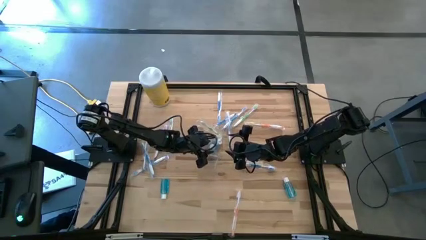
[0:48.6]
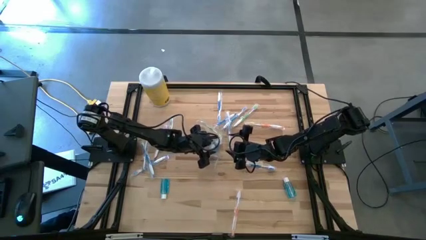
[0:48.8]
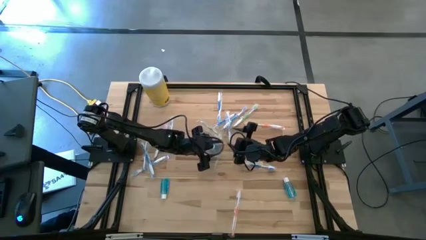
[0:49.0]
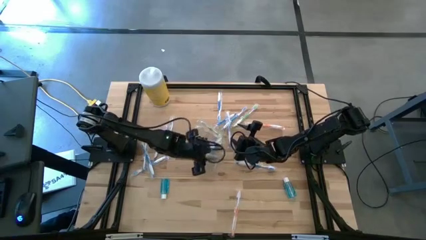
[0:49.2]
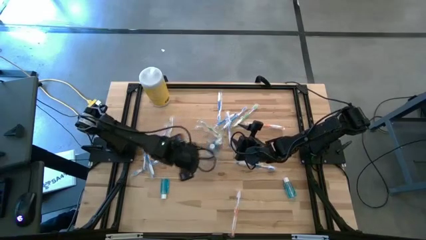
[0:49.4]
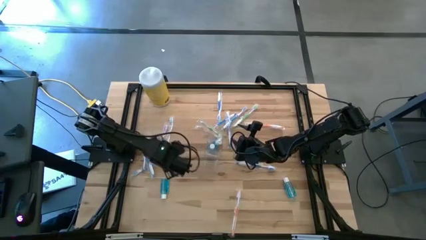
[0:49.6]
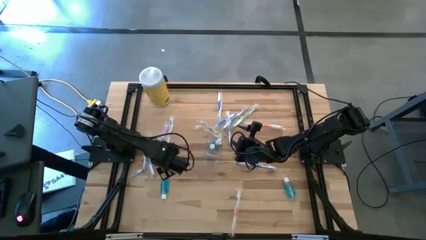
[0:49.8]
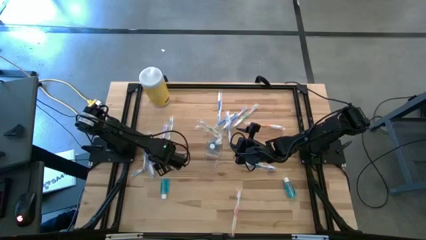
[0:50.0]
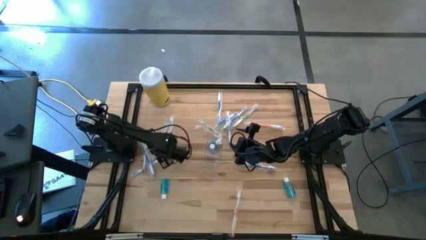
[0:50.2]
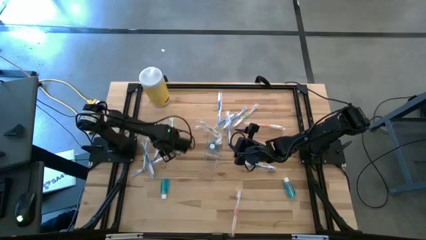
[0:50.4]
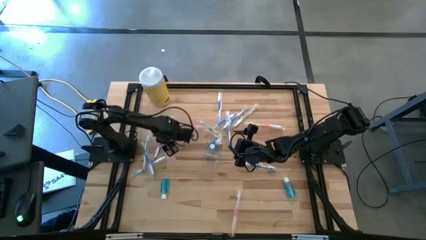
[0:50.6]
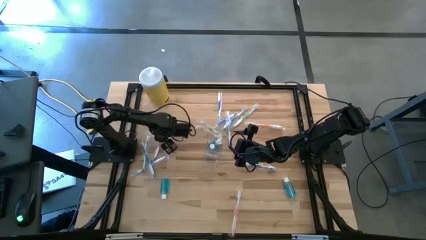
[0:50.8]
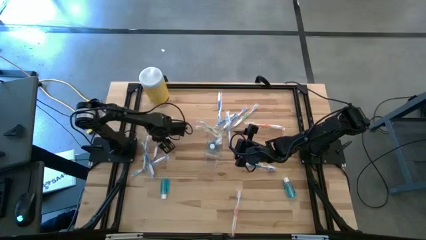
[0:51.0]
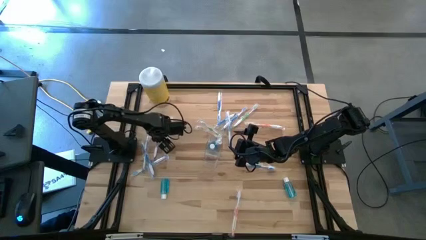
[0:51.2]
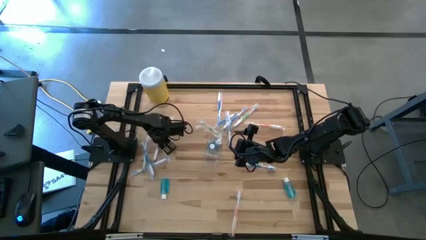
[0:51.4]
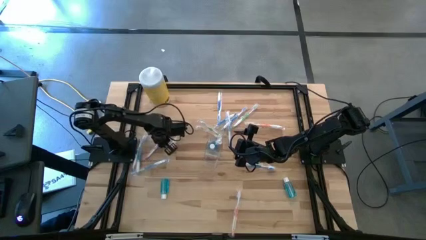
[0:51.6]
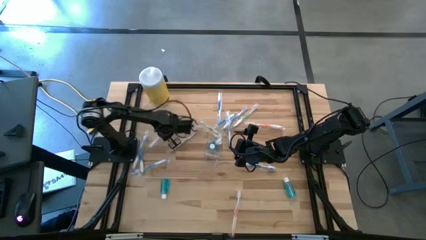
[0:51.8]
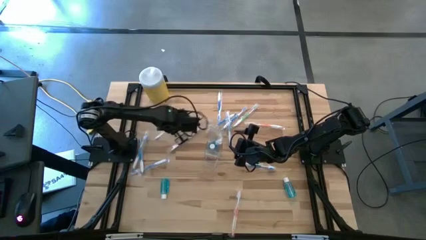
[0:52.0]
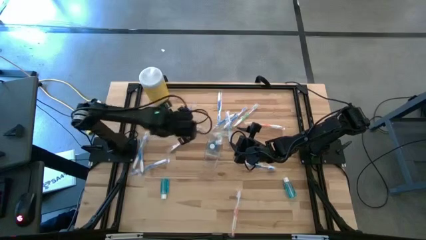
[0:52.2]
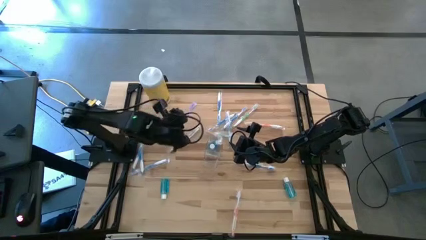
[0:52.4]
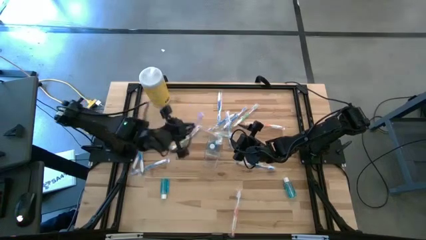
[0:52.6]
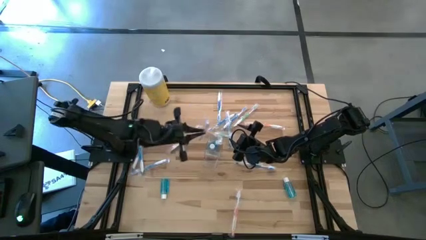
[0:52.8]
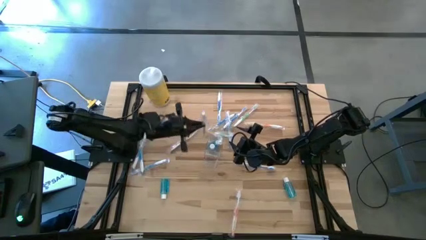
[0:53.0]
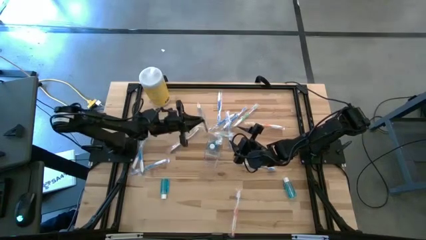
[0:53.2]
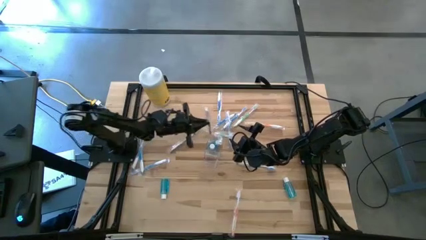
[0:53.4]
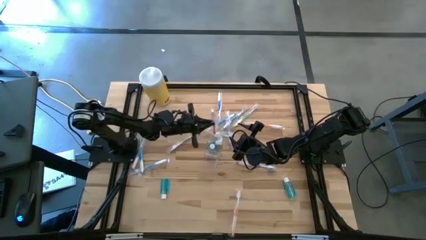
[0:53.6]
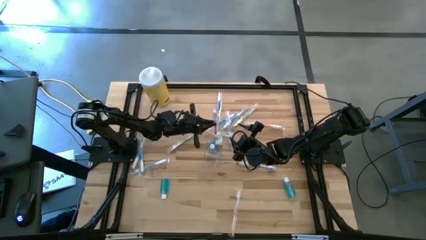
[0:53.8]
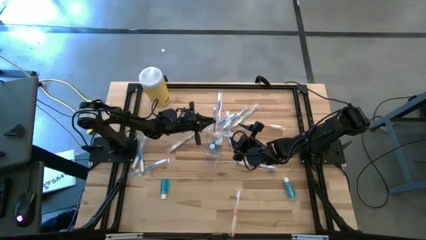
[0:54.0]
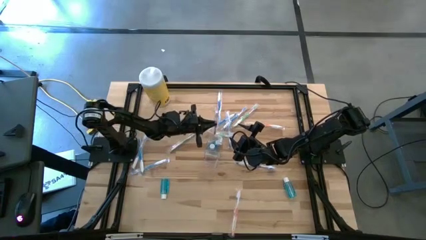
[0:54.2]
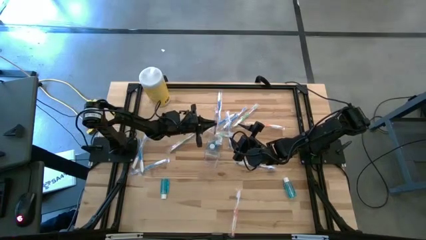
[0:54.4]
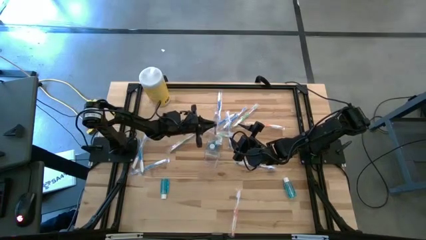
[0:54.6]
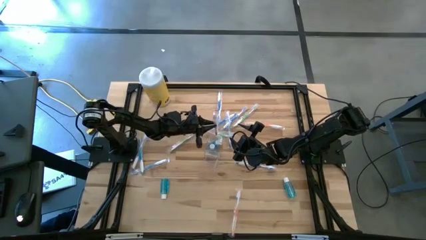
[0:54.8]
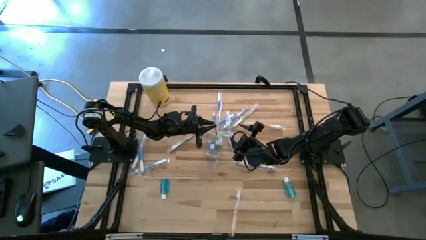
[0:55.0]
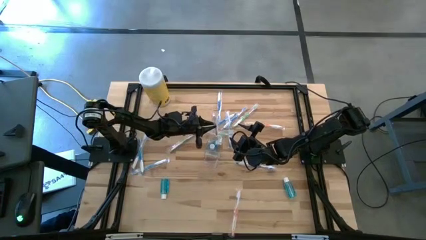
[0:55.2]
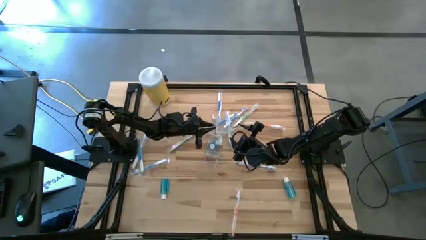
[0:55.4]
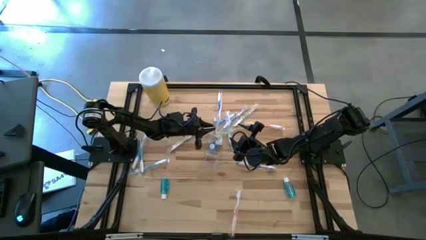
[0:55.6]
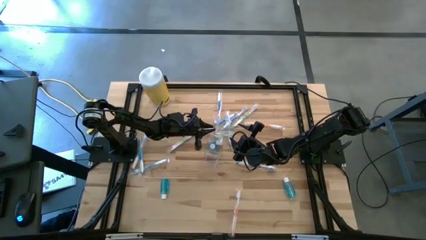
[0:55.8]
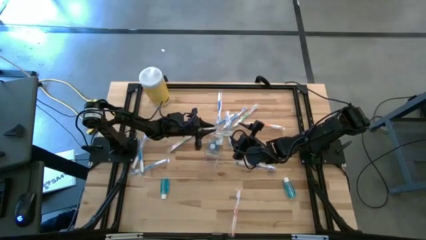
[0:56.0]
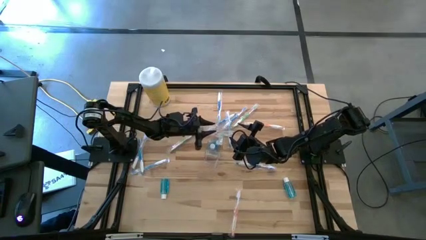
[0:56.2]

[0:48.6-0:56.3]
Task: Pick & Place toothbrushing station
Put the purple toothbrush into the transparent organizer

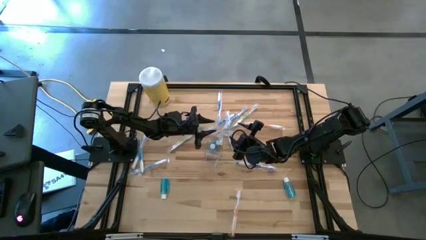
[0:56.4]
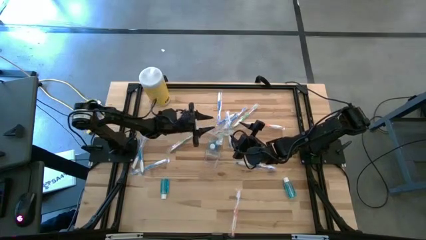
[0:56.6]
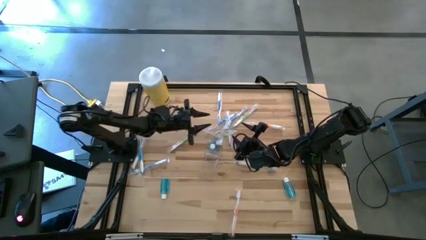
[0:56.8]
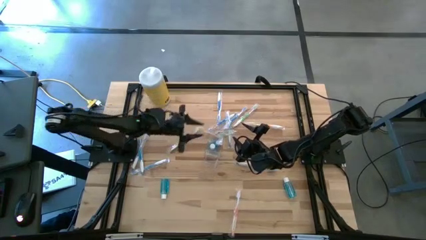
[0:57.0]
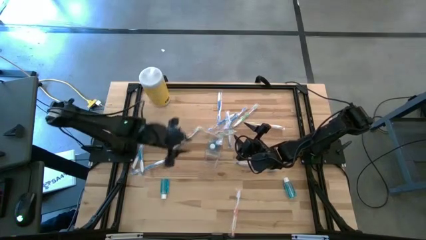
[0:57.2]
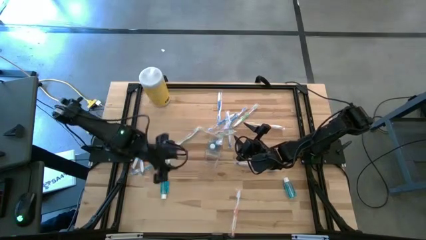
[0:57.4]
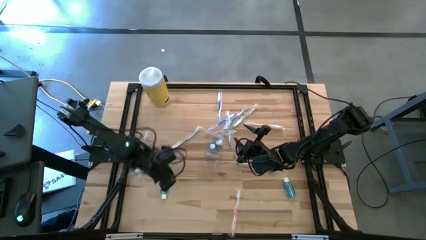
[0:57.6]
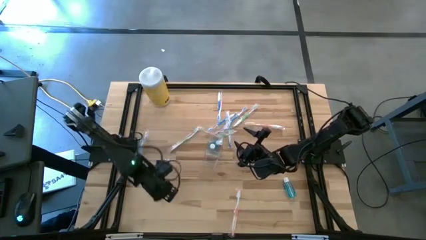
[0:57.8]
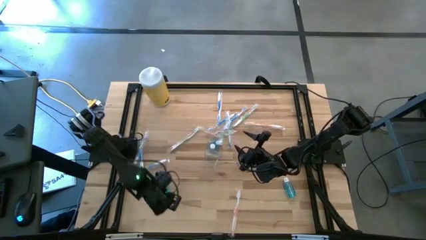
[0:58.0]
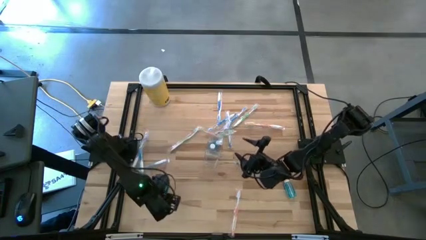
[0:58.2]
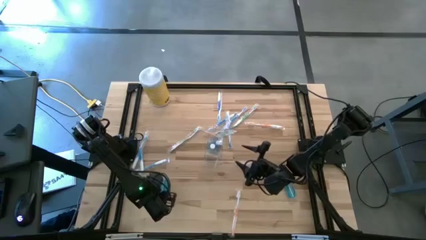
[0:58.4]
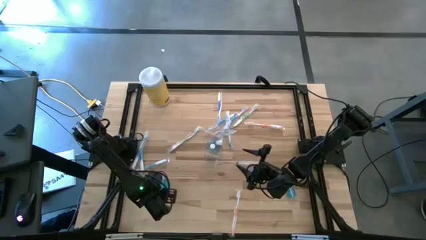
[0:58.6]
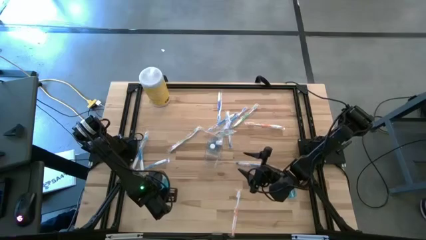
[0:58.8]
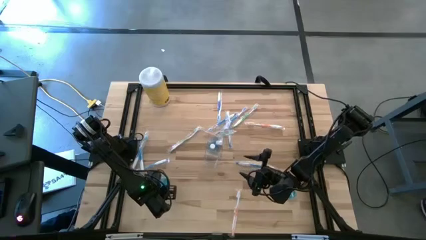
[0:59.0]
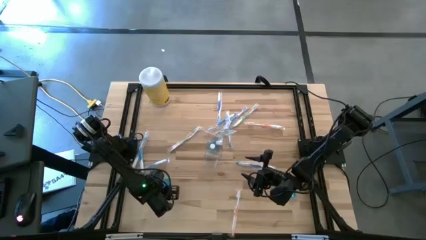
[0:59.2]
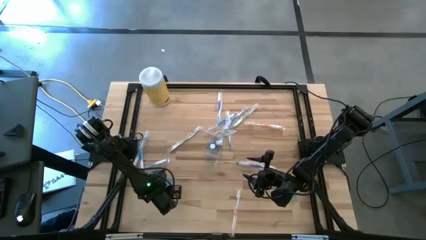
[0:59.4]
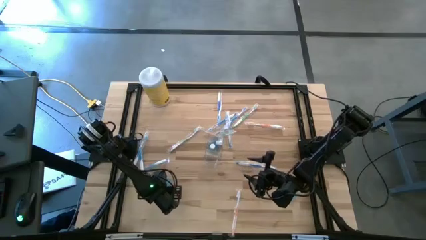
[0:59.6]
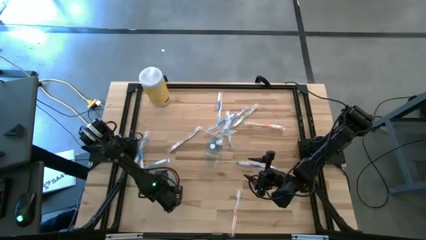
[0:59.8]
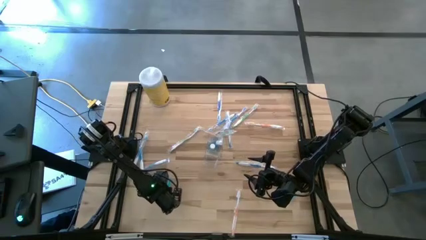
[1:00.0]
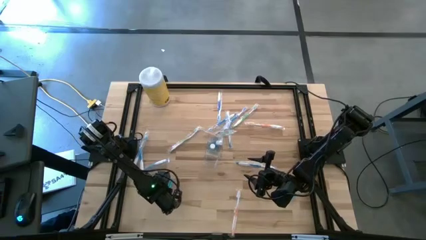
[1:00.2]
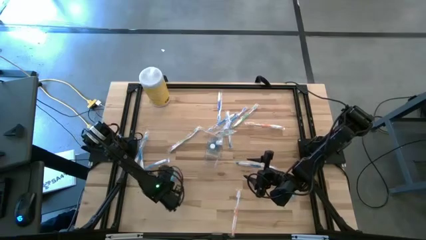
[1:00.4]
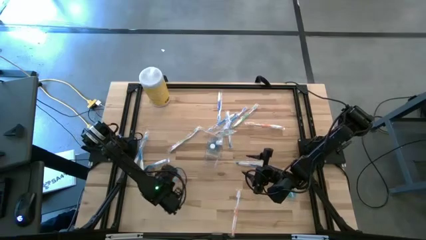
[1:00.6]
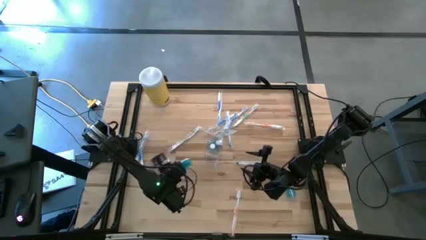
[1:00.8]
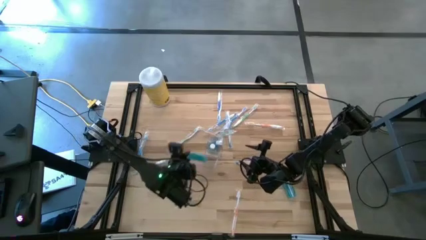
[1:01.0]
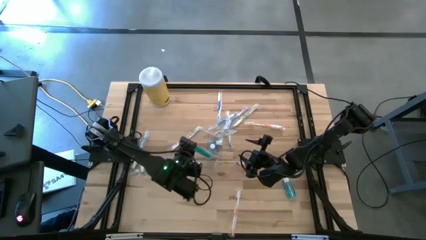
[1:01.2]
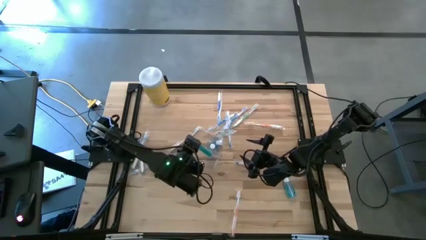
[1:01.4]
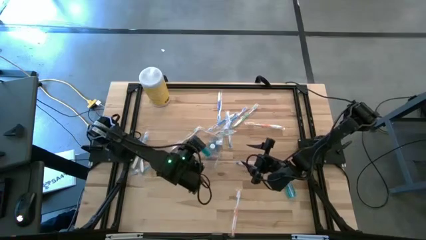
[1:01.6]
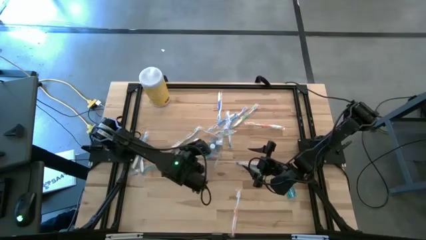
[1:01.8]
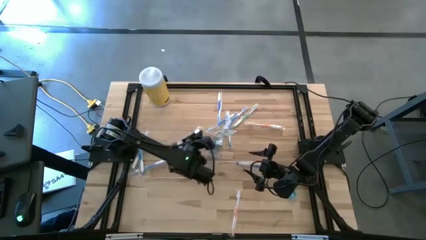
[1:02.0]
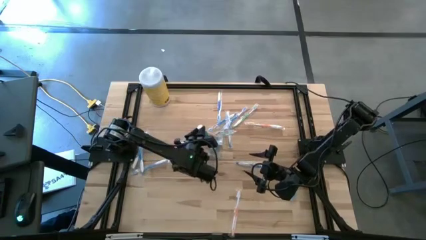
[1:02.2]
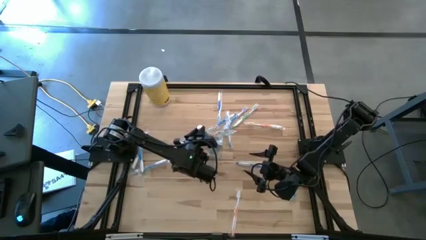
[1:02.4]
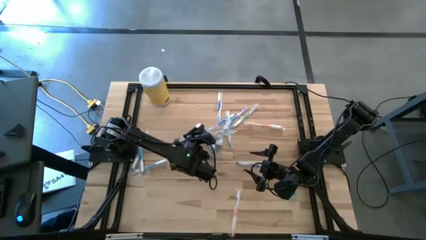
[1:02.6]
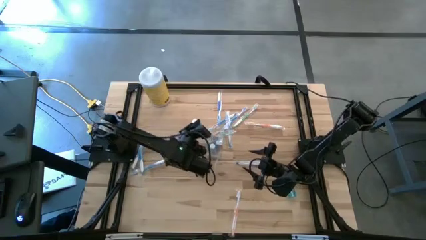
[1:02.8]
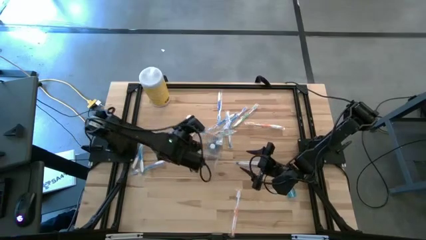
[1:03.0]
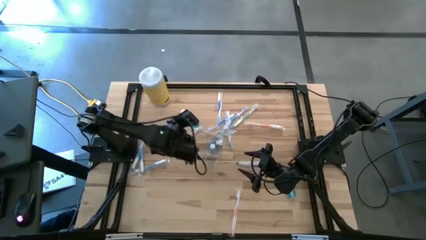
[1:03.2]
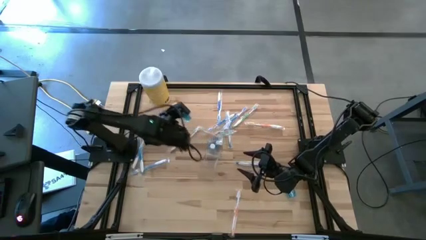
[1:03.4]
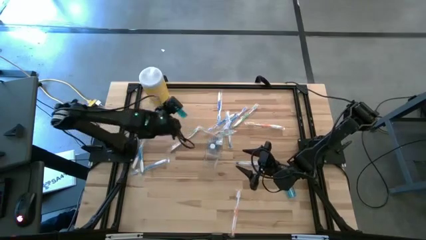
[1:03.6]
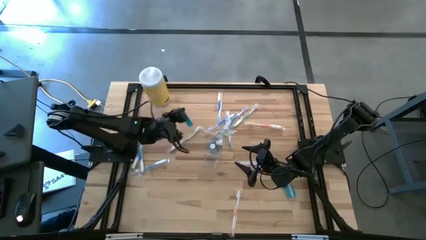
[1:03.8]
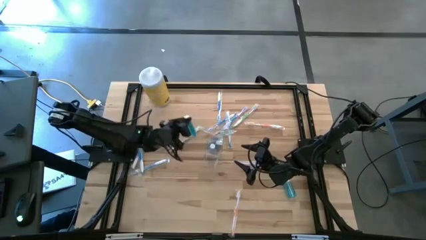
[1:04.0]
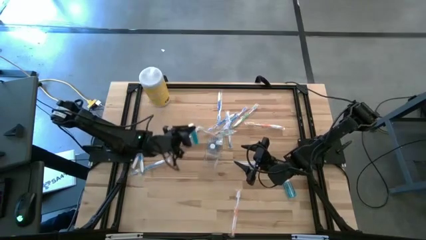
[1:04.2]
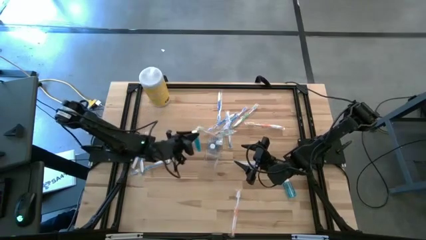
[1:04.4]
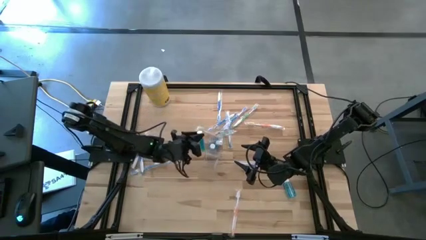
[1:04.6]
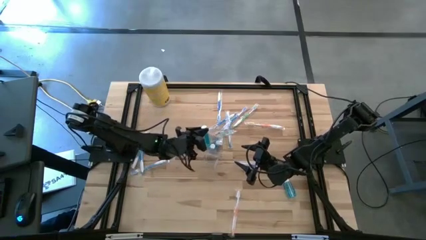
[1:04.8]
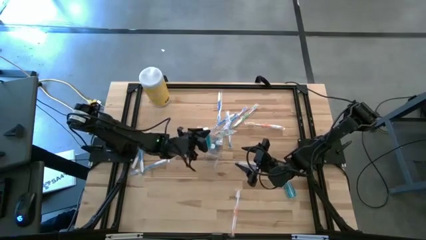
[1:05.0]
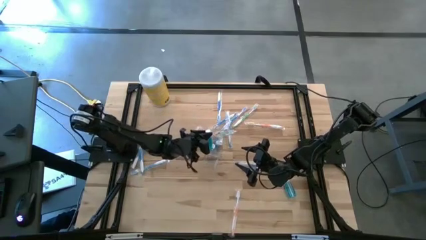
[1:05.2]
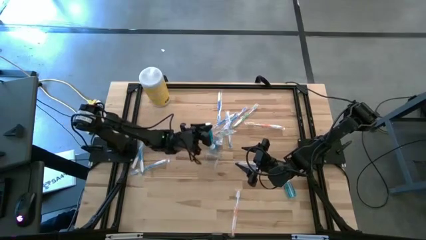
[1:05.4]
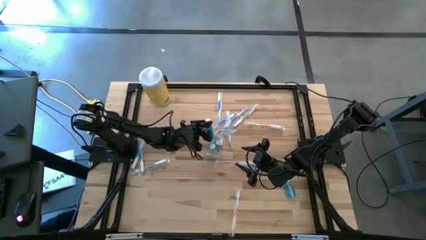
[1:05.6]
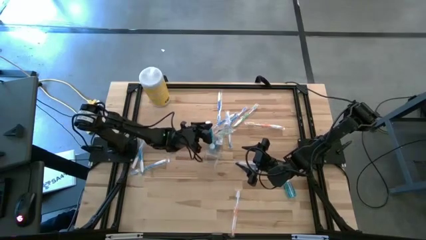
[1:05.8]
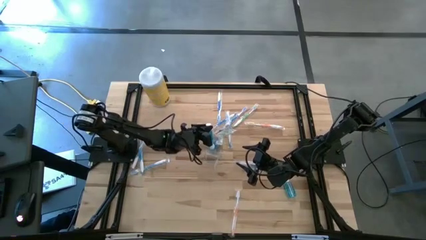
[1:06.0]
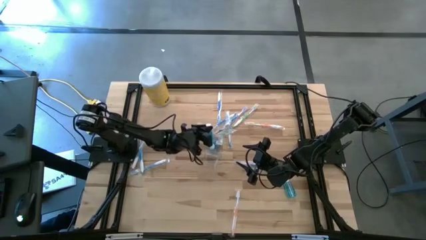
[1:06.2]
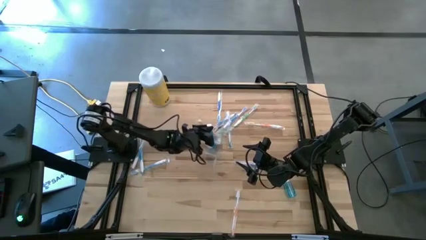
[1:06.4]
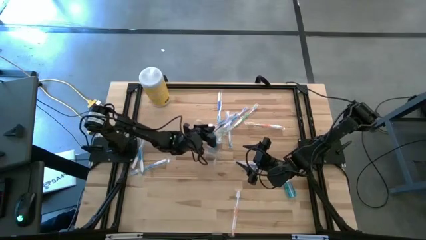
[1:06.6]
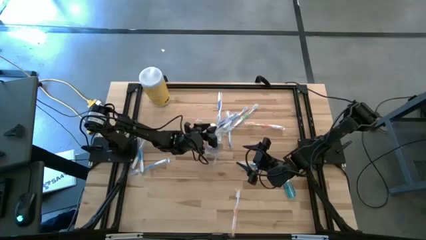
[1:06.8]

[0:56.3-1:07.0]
Put the blue mouthwash into the transparent organizer
